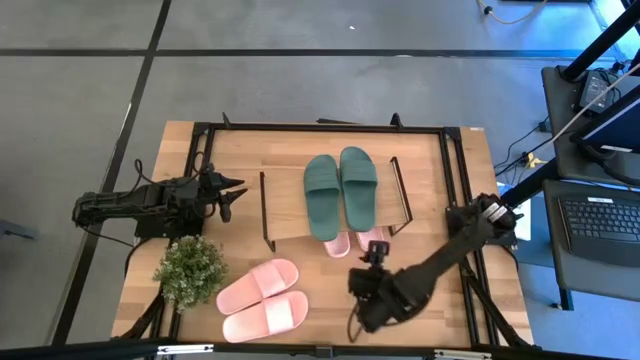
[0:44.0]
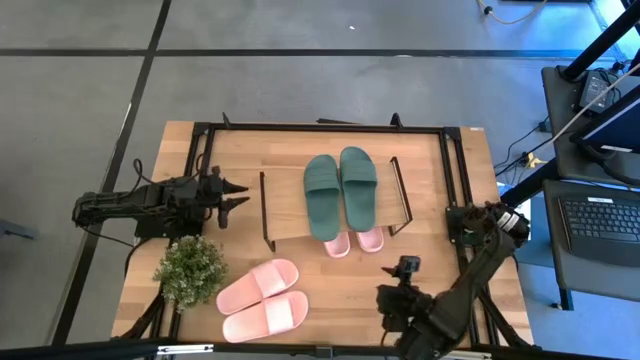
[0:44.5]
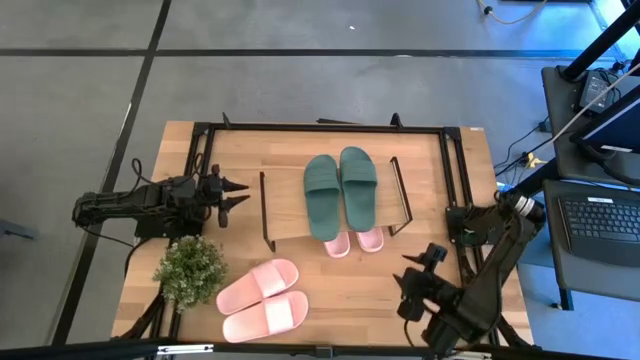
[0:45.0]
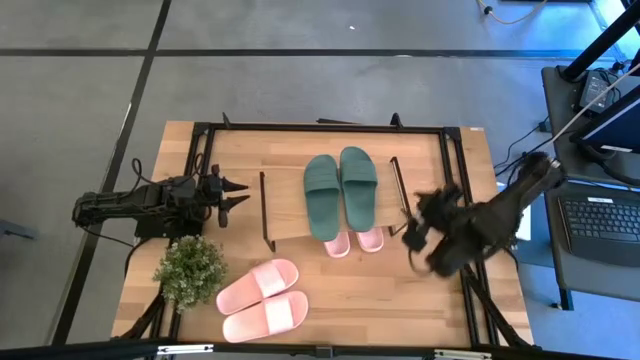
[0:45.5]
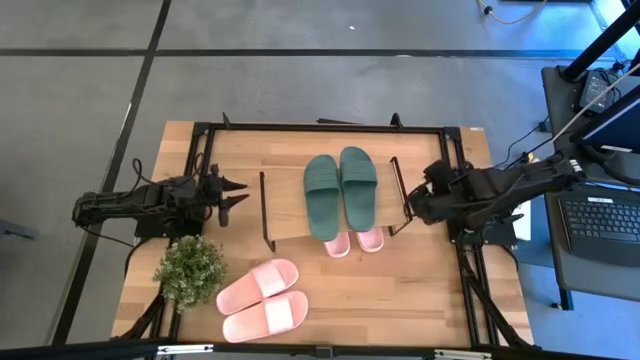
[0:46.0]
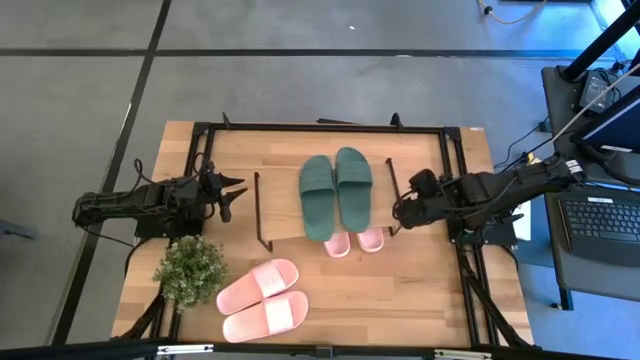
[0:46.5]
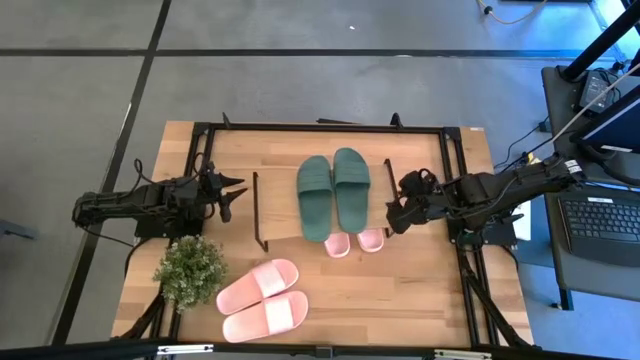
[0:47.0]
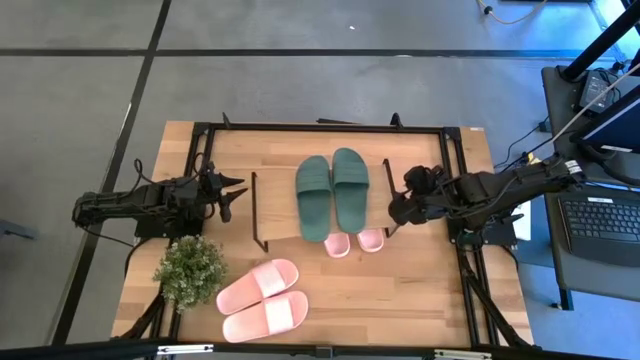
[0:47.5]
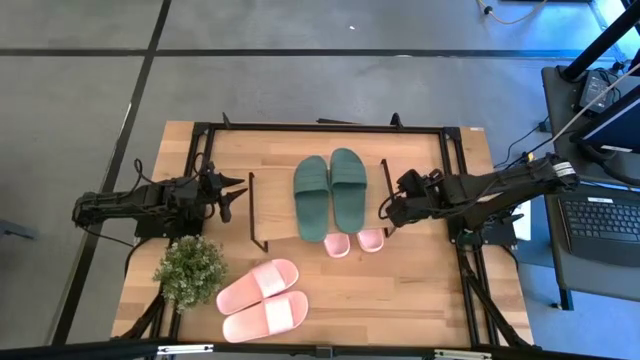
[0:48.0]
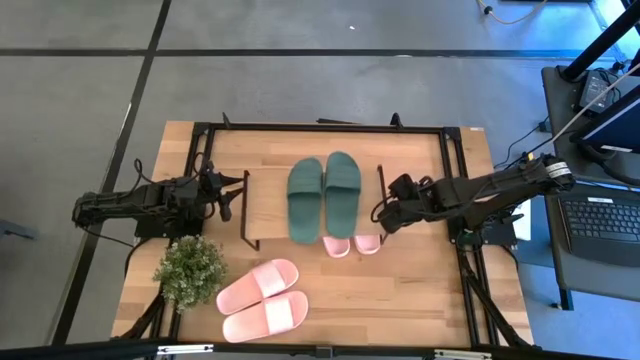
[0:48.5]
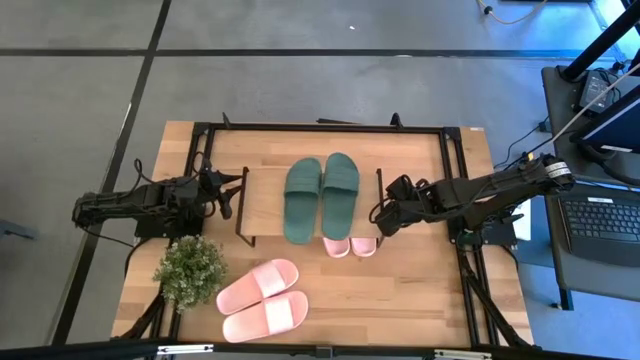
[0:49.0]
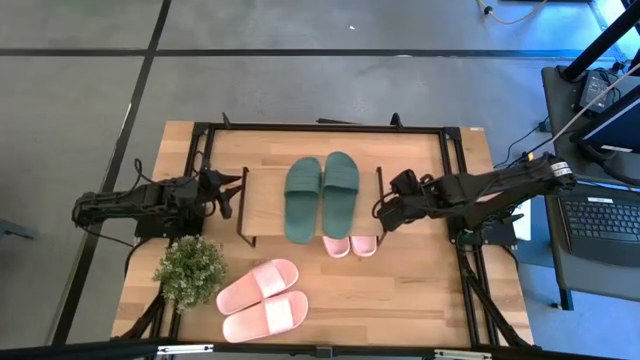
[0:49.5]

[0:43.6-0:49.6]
Task: Pick and place slides into the shelf
Adjust the shelf

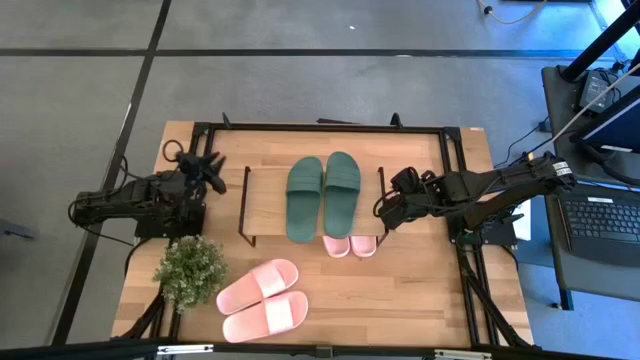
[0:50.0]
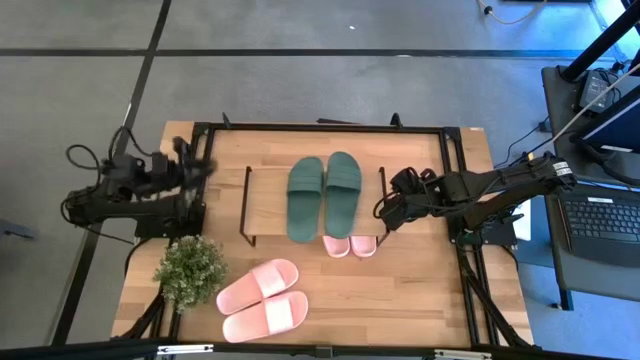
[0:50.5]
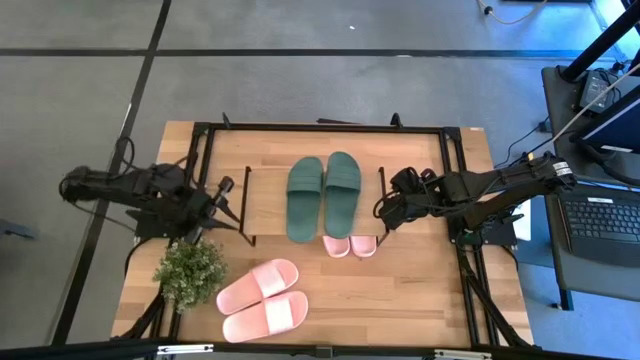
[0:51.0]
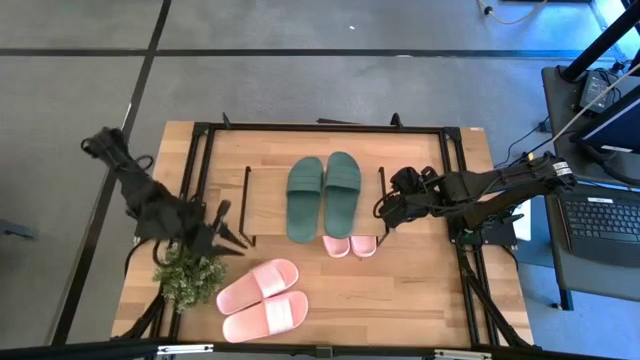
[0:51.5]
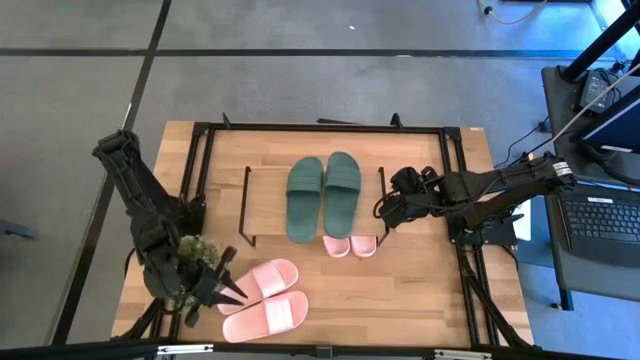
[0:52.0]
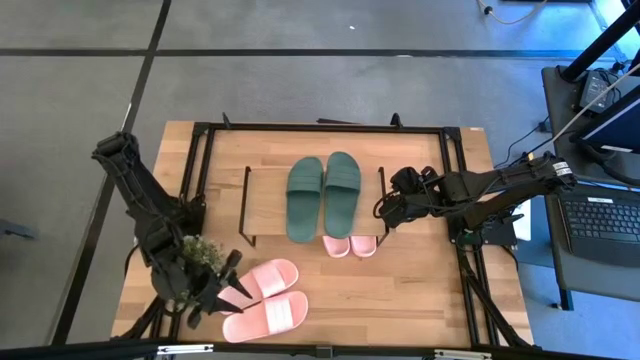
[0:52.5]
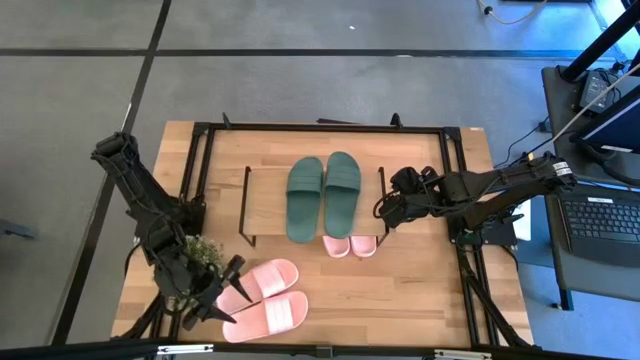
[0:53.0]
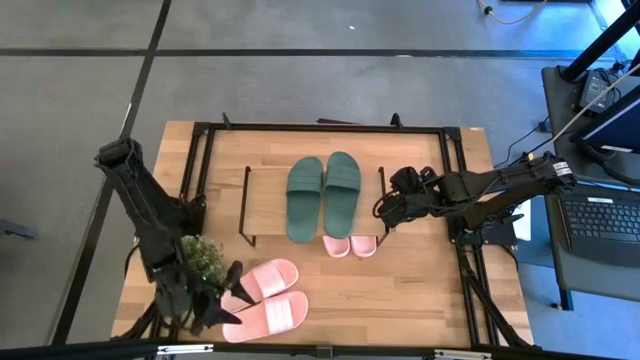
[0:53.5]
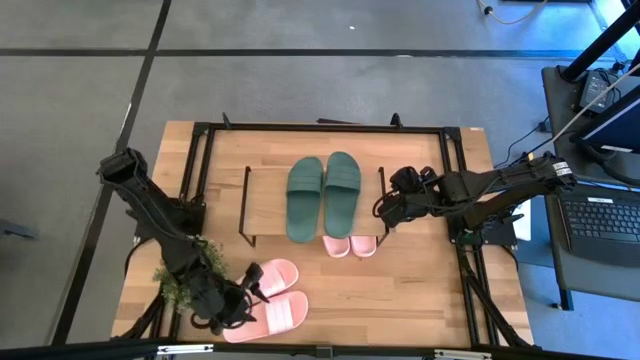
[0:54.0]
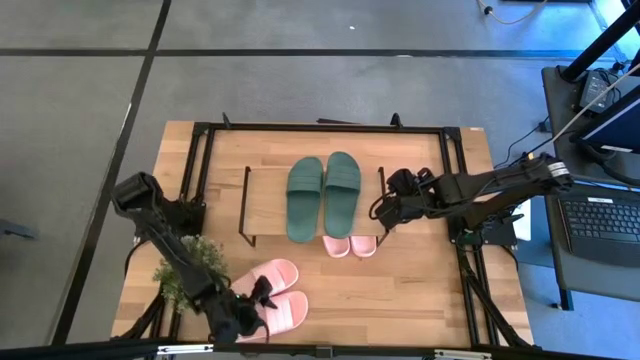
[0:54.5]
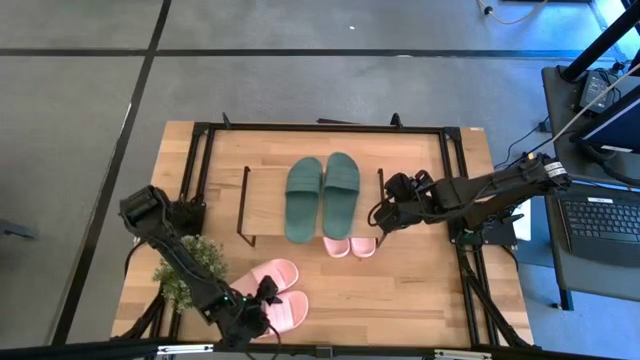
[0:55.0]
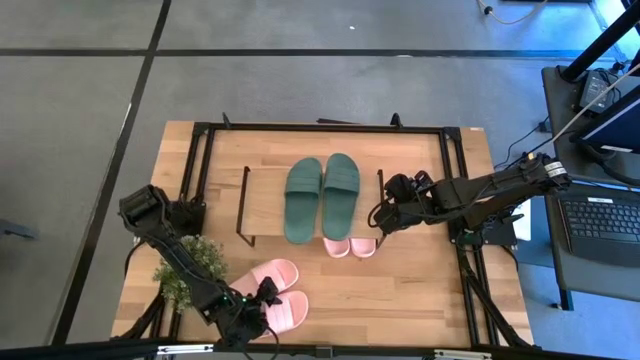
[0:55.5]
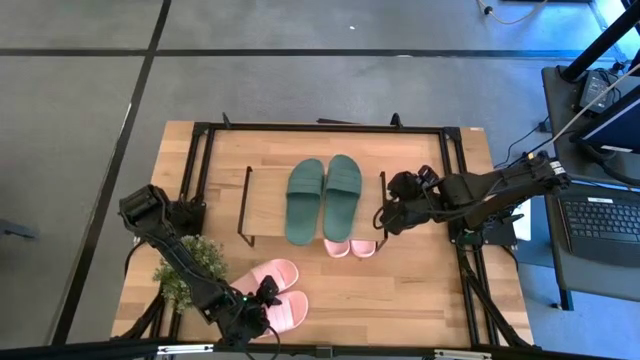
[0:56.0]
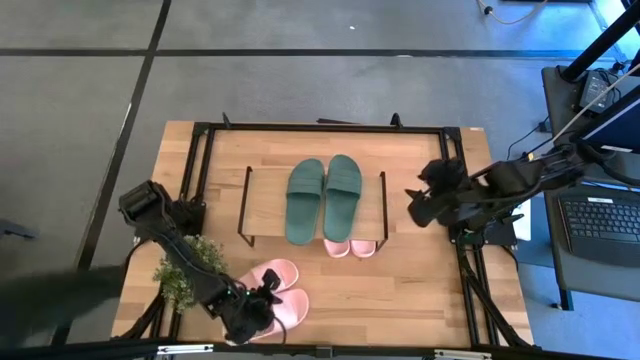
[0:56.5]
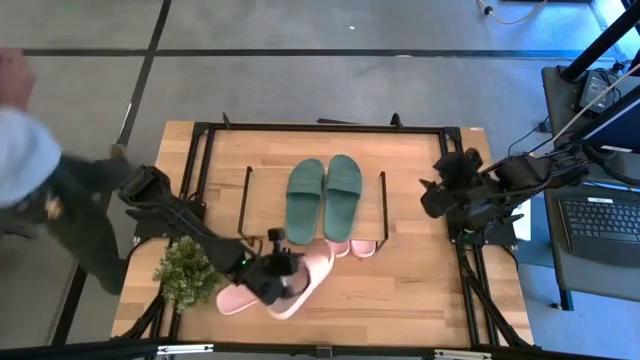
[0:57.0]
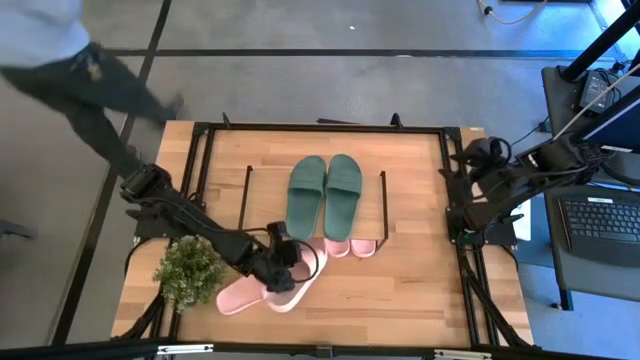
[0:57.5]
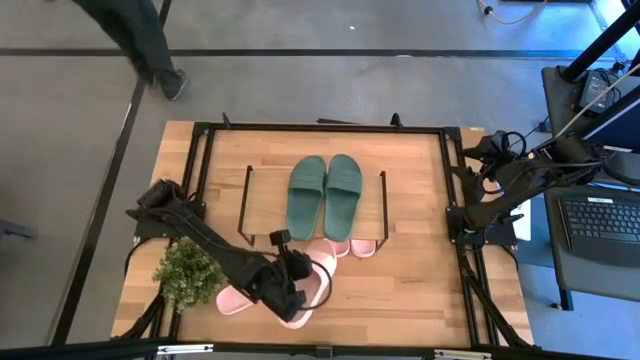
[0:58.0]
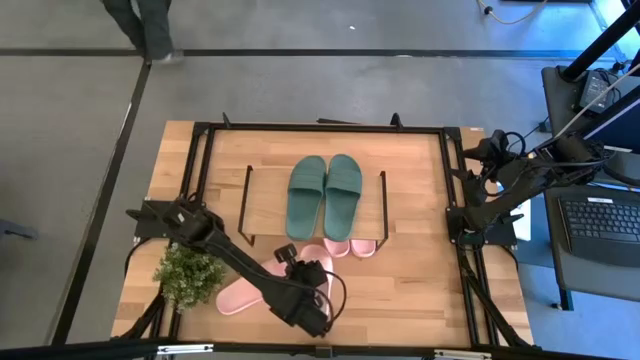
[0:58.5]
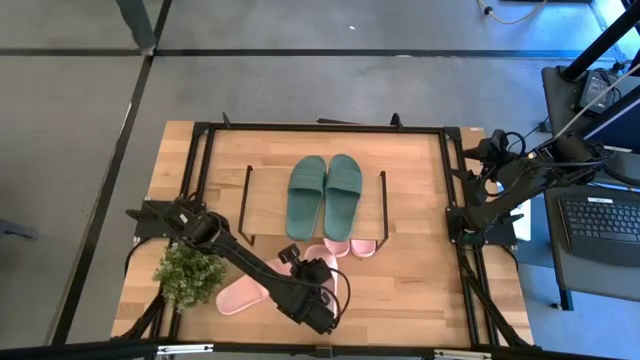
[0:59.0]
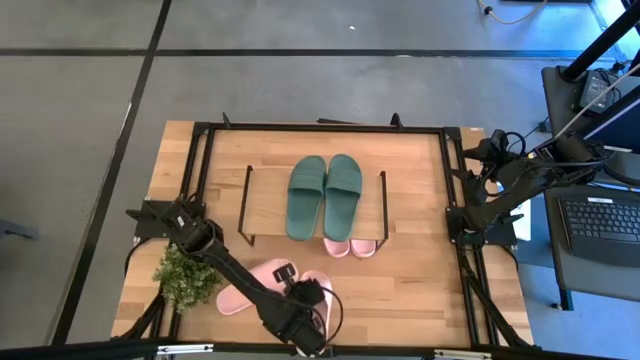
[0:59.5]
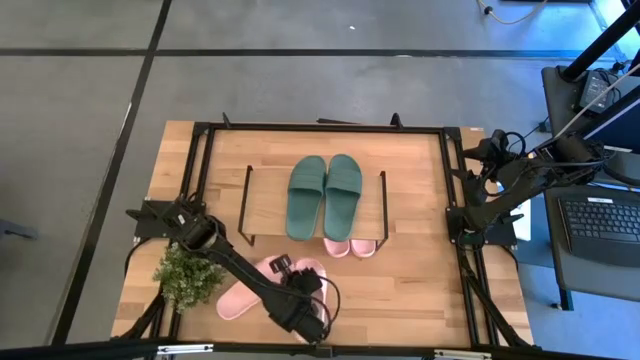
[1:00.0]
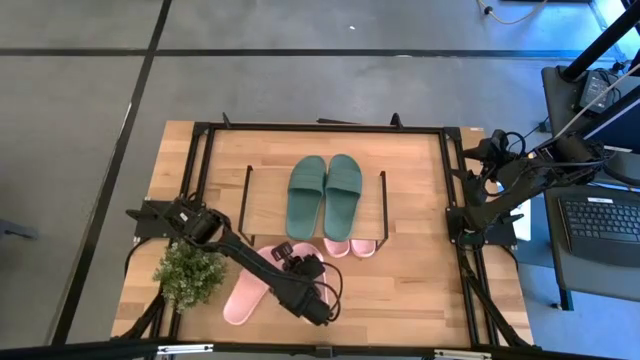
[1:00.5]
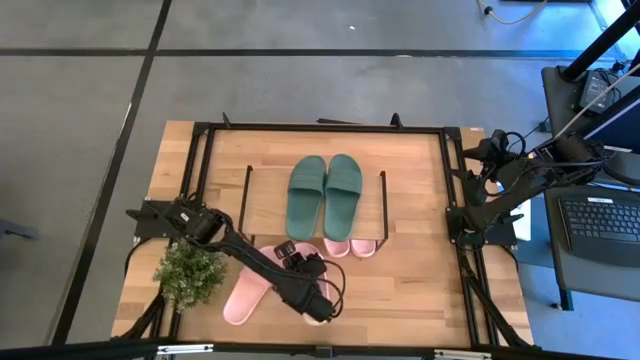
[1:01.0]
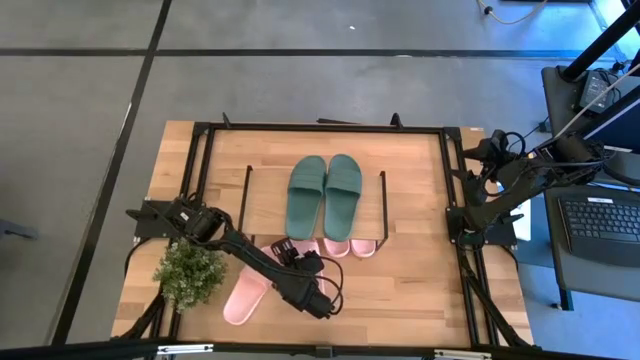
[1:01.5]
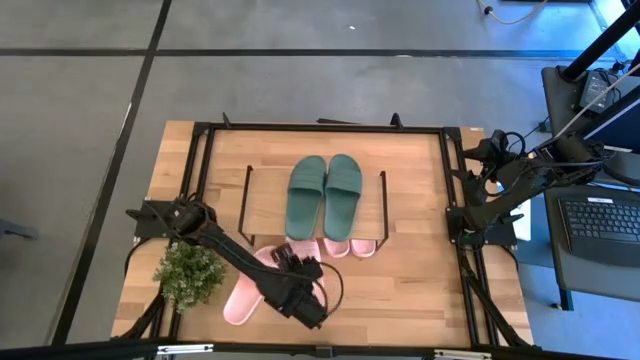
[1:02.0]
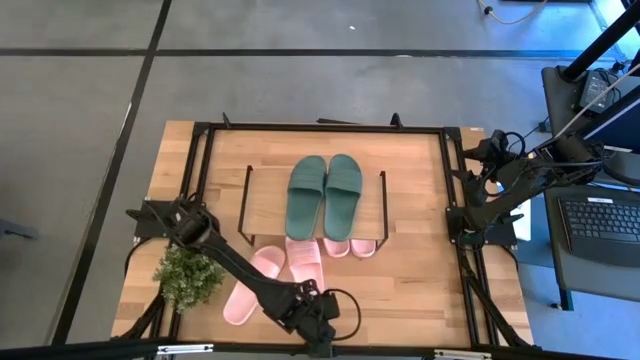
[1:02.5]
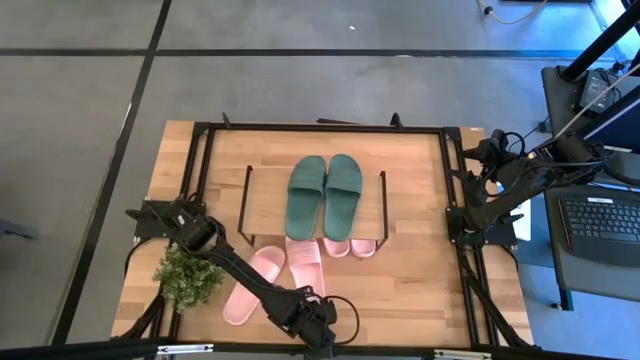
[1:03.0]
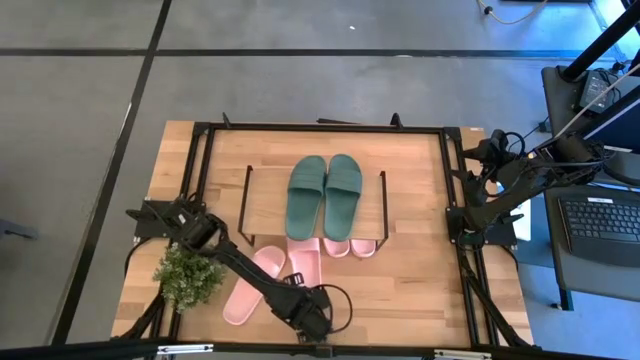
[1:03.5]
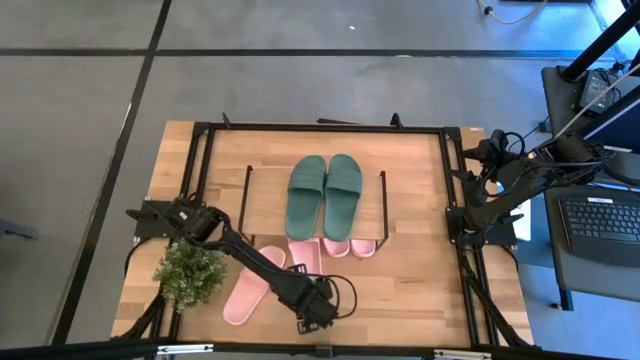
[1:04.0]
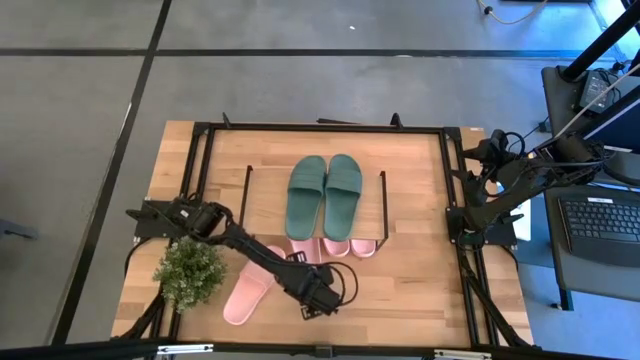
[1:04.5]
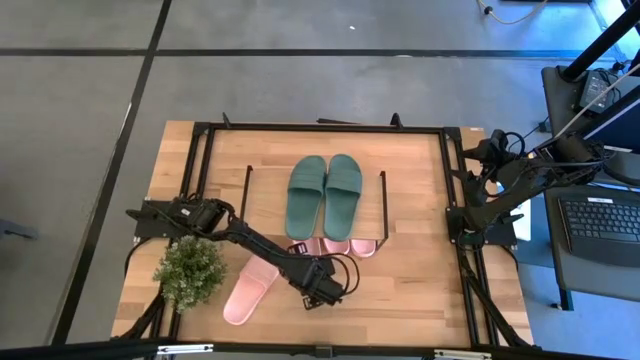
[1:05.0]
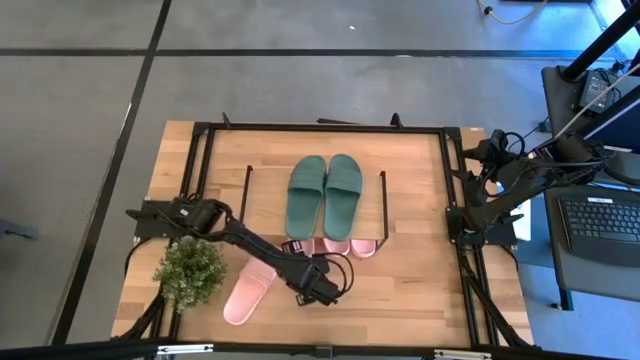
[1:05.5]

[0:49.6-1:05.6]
Put the pink slide under the shelf
